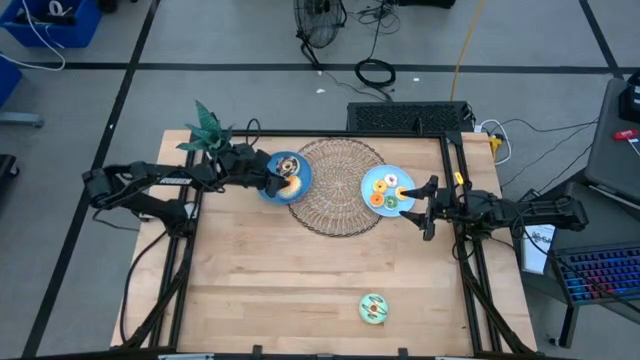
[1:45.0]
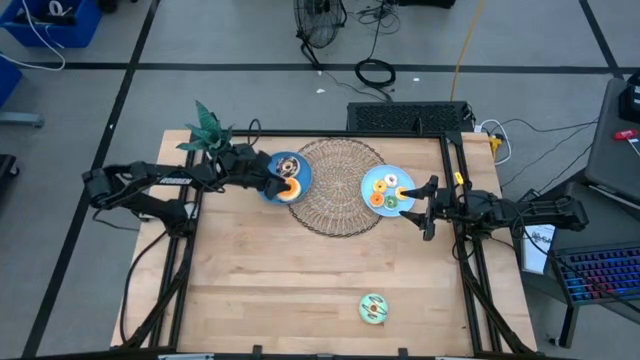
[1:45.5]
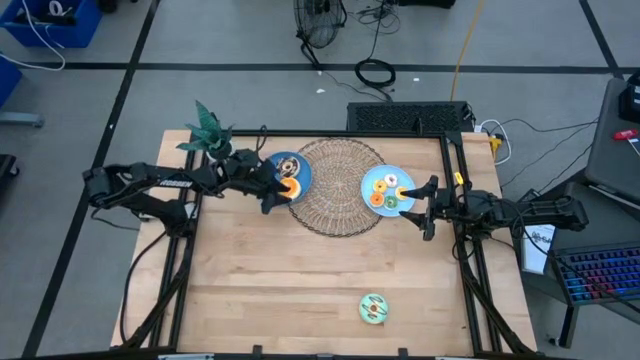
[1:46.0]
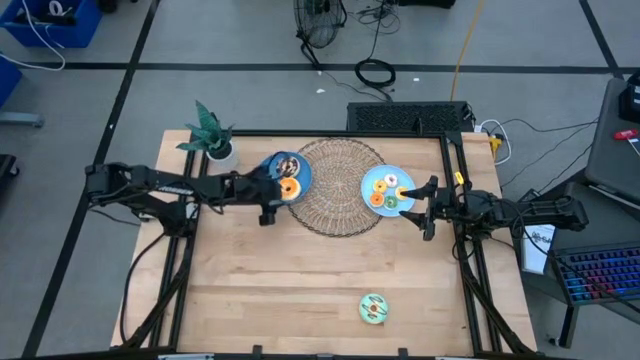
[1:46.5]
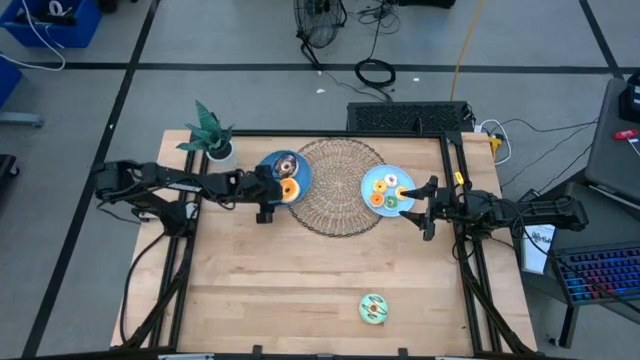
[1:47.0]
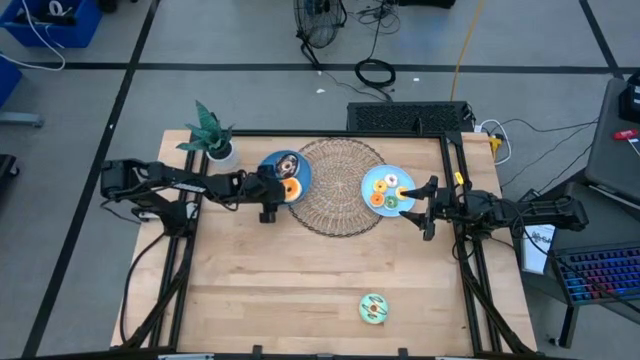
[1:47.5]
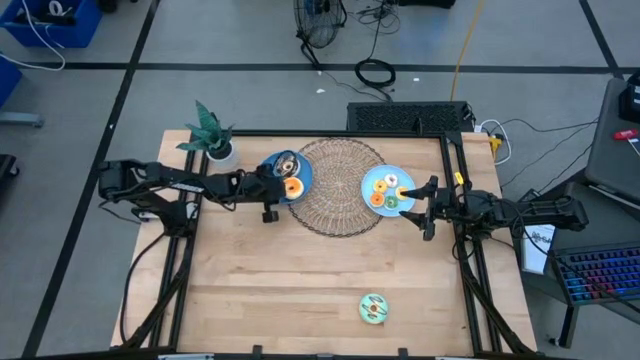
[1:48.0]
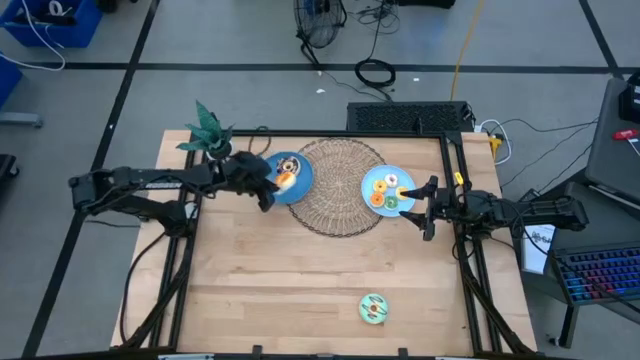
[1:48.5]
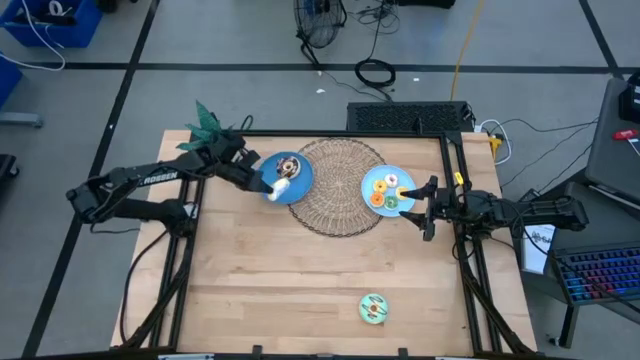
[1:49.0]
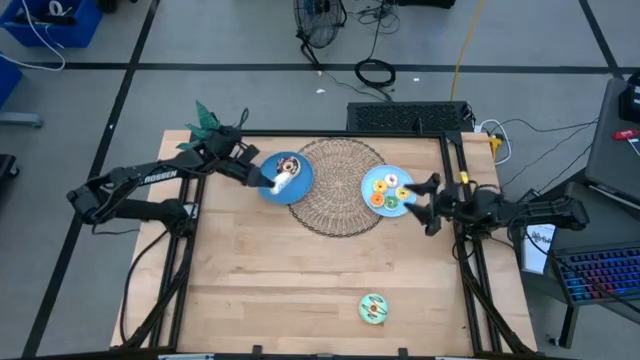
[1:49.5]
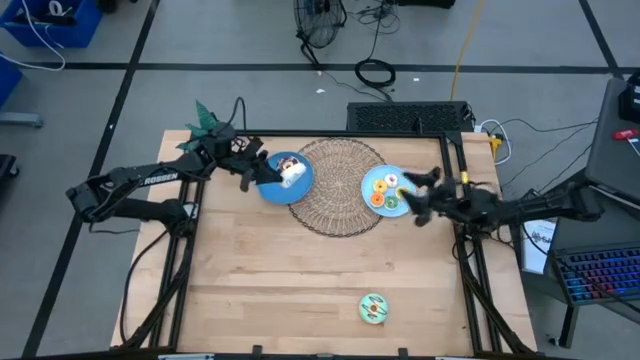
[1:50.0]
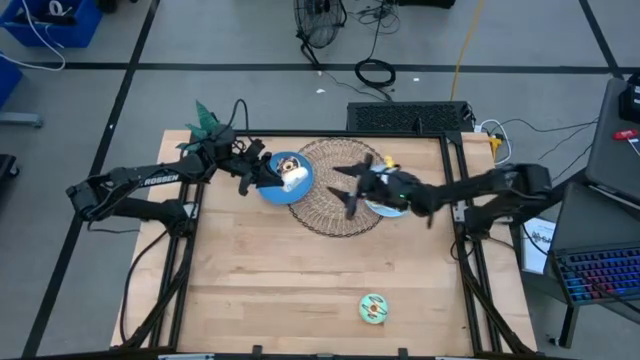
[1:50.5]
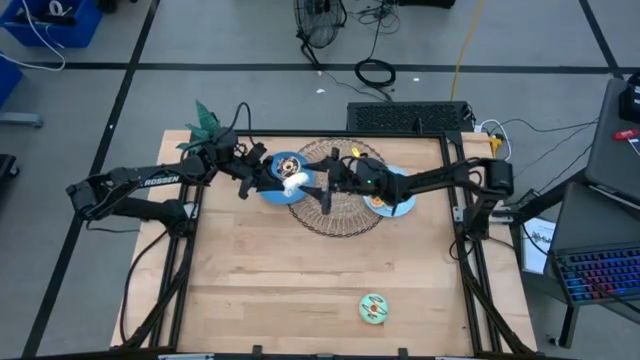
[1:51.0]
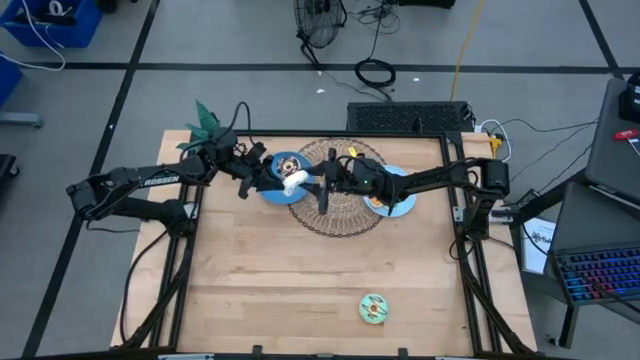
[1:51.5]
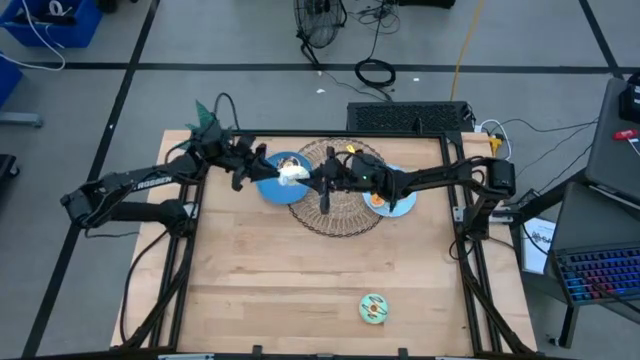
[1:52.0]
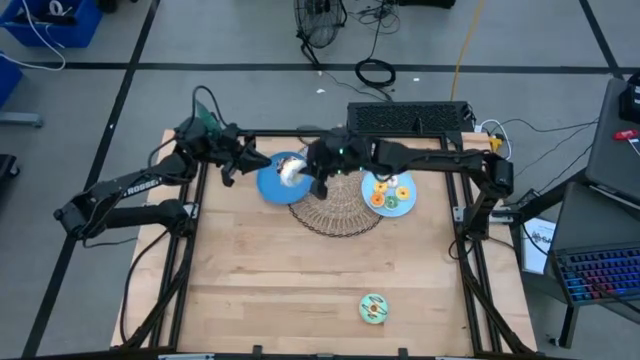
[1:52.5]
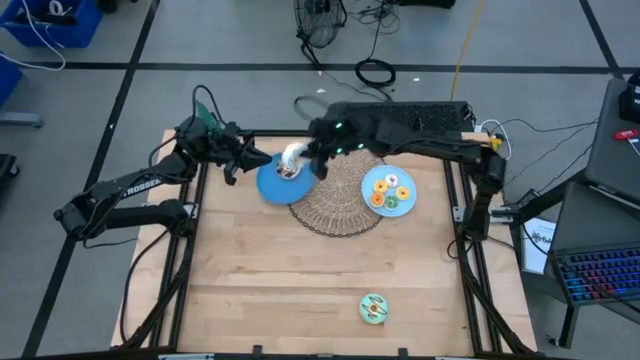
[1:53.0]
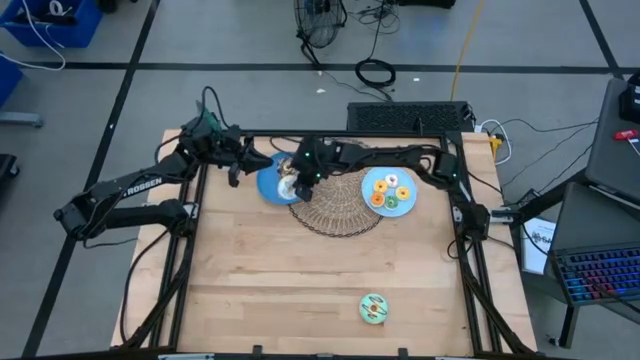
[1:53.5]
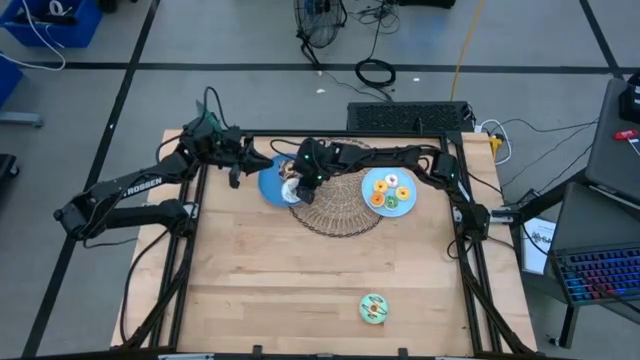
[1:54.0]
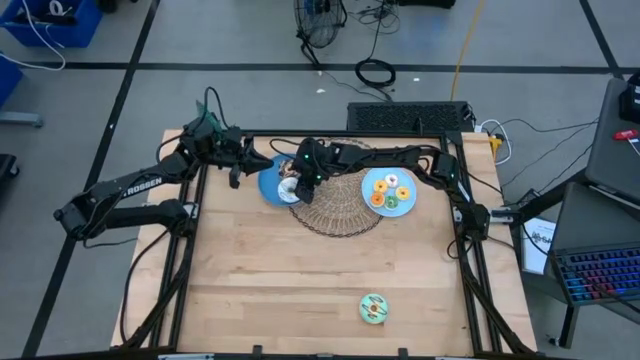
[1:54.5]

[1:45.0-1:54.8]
Task: Pick & Place donuts
Put the large white donut on the dark blue plate

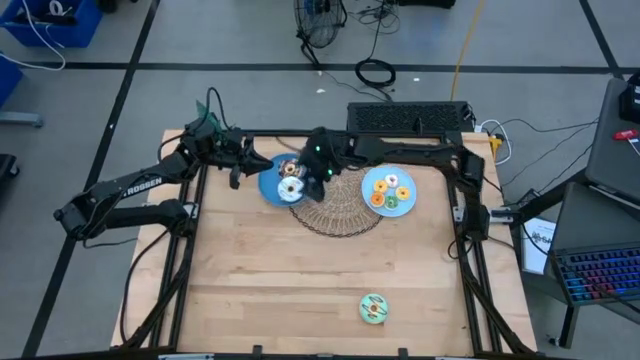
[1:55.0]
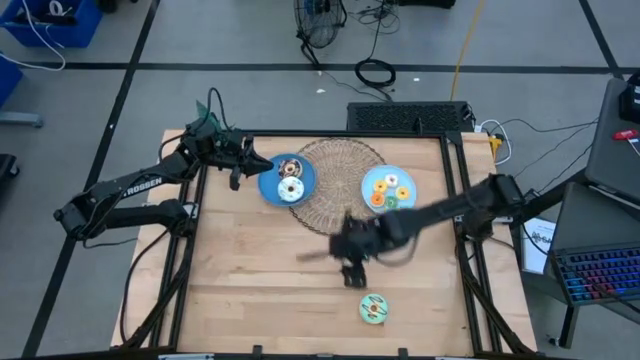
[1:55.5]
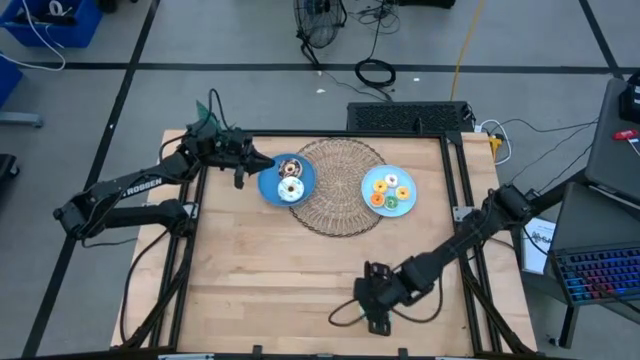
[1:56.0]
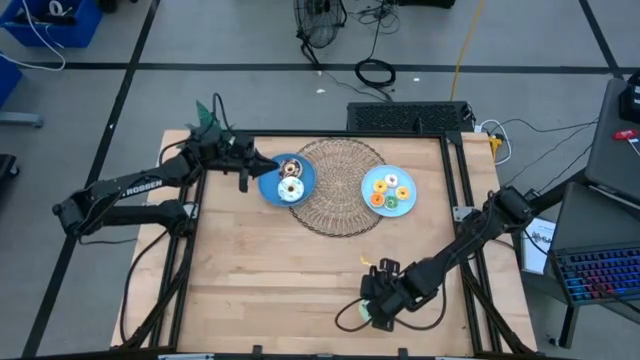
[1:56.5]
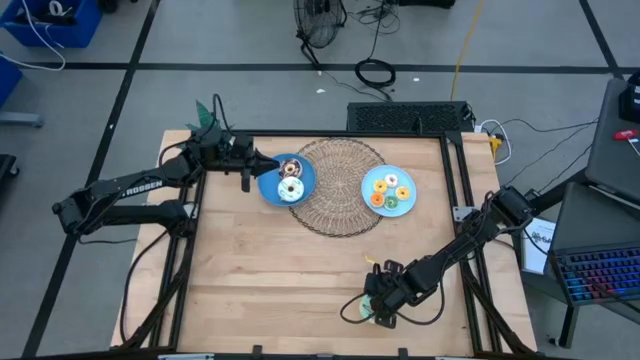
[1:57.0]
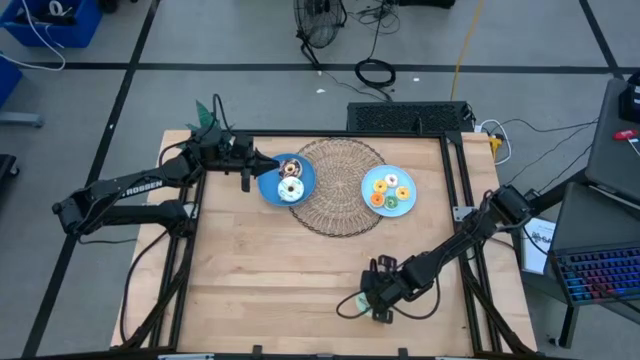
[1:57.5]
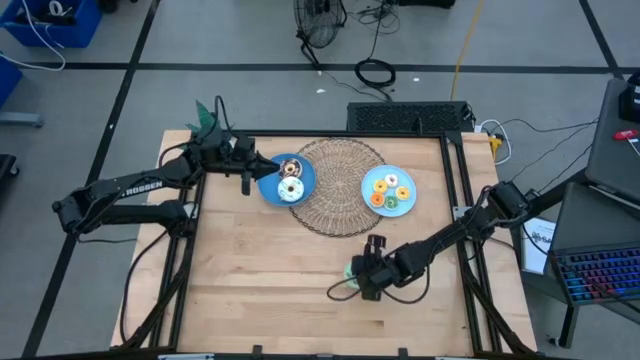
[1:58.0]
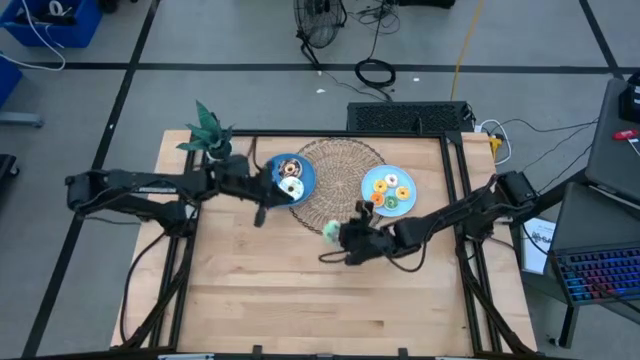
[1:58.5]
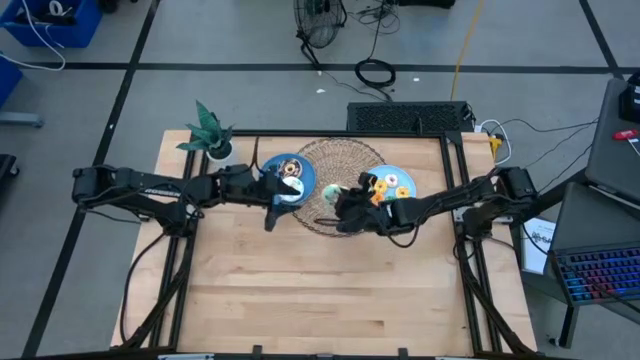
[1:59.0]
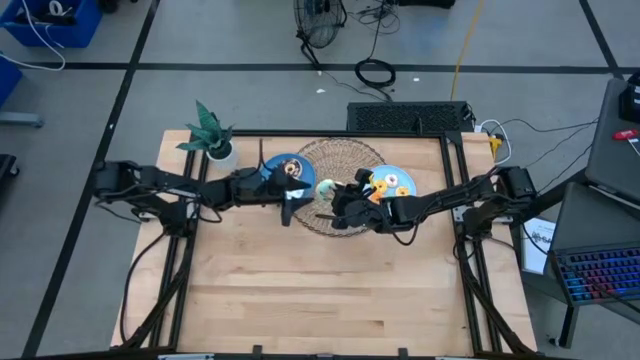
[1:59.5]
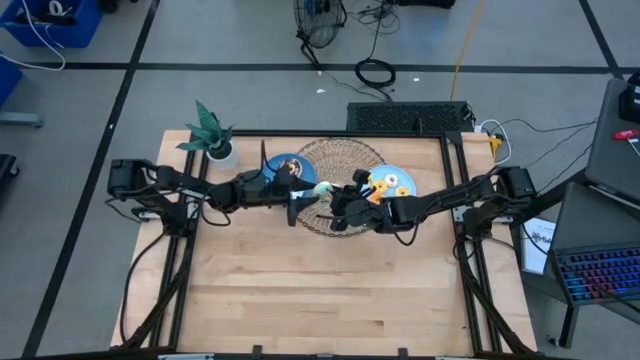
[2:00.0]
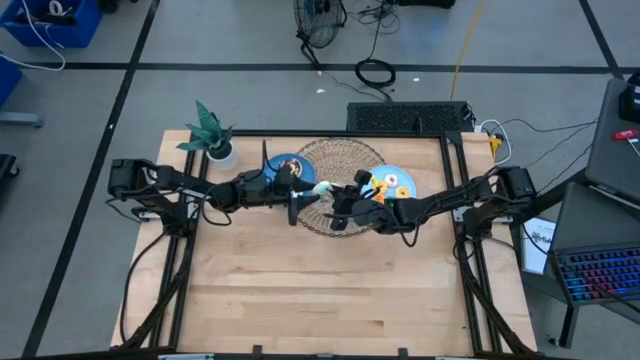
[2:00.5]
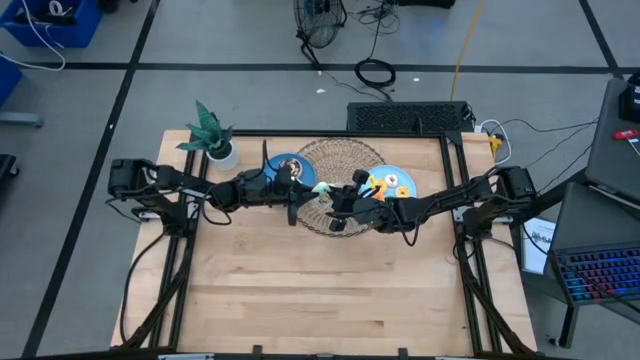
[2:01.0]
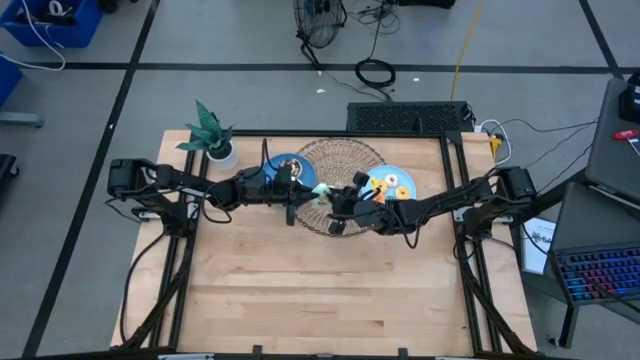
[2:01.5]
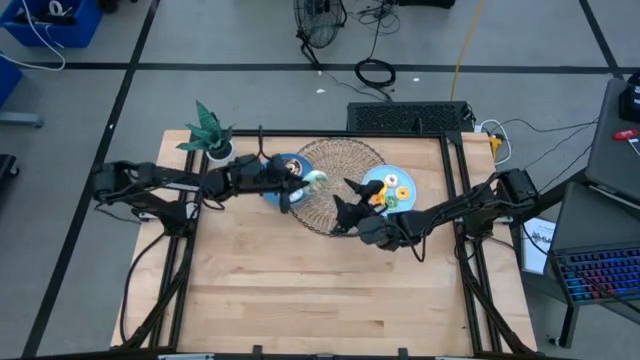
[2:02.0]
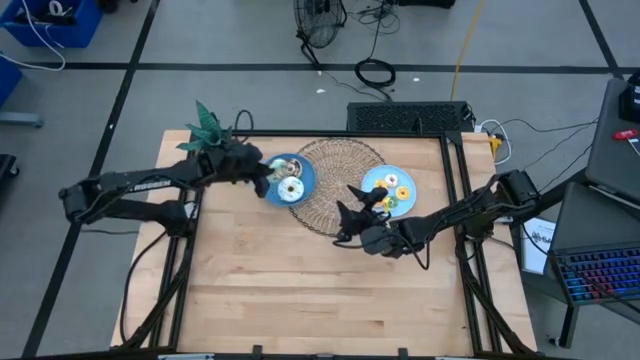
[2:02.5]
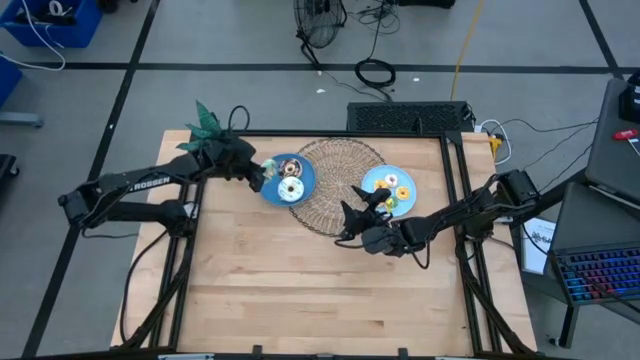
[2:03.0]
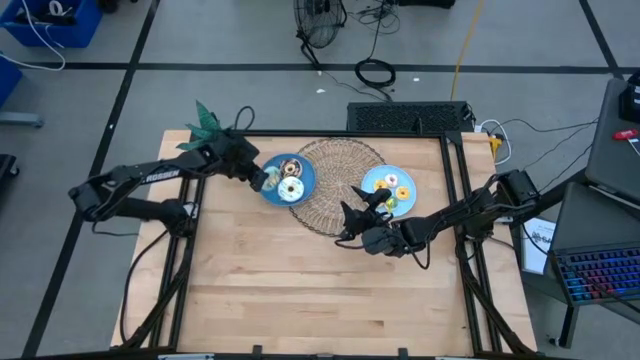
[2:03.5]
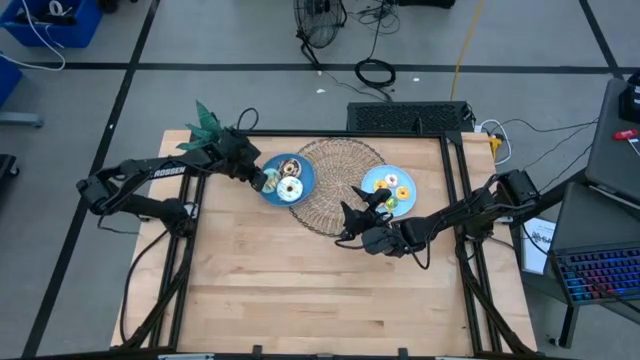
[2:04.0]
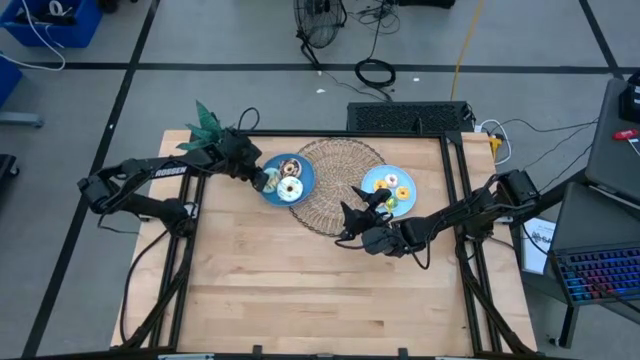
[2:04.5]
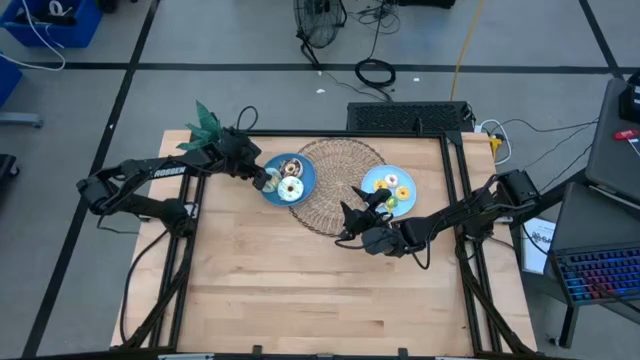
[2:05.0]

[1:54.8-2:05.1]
Put the large blue donut on the dark blue plate
